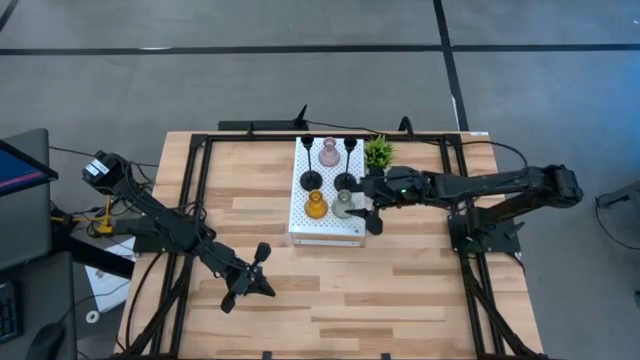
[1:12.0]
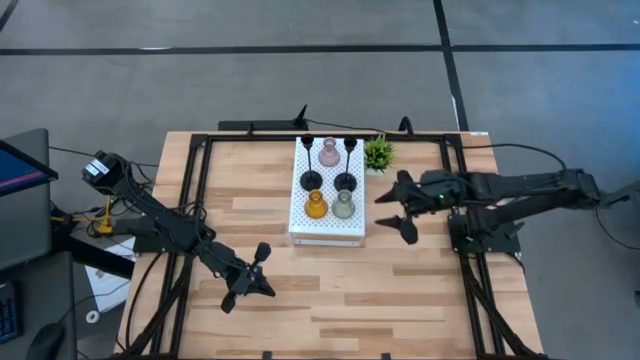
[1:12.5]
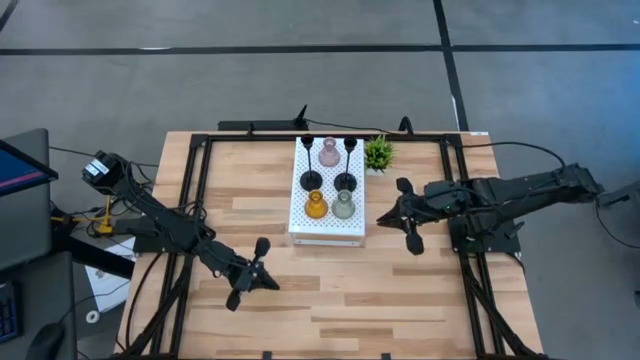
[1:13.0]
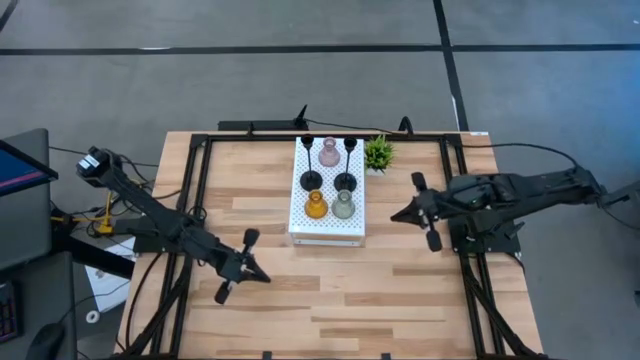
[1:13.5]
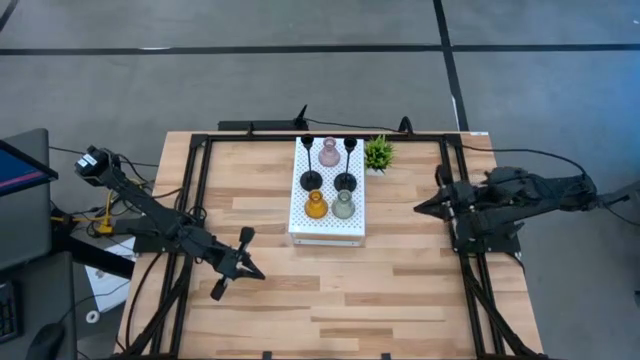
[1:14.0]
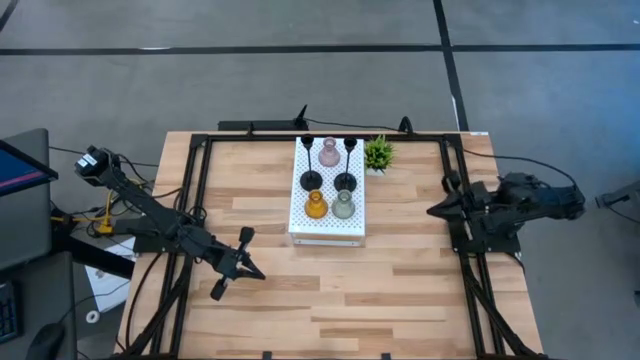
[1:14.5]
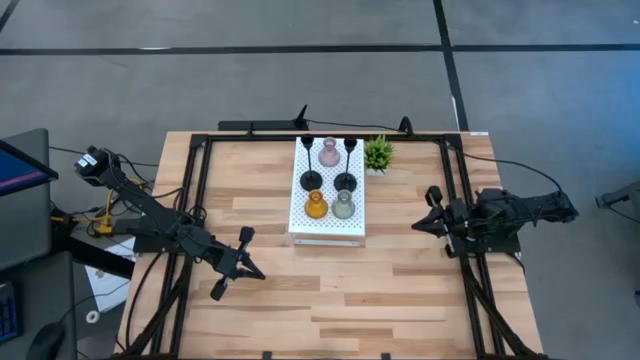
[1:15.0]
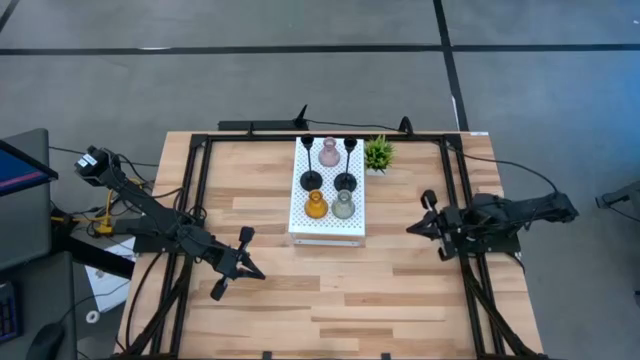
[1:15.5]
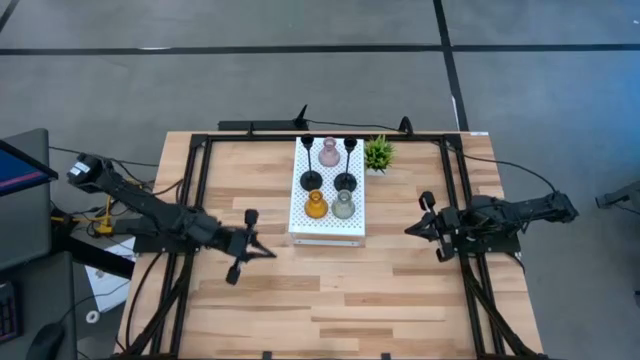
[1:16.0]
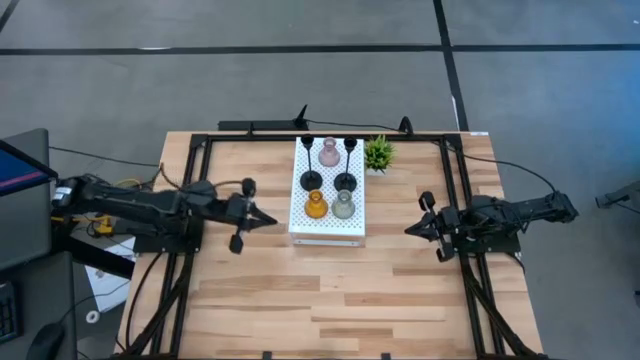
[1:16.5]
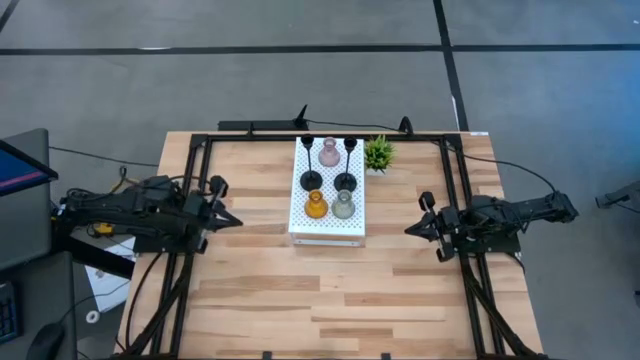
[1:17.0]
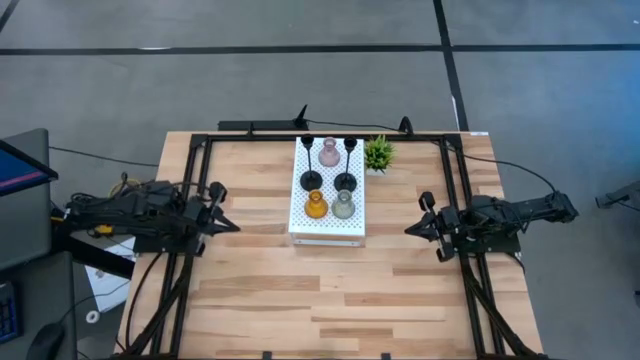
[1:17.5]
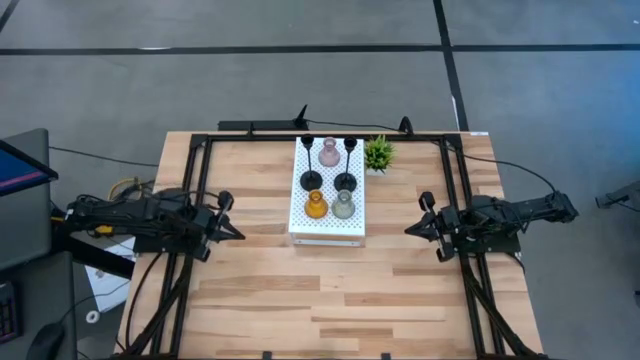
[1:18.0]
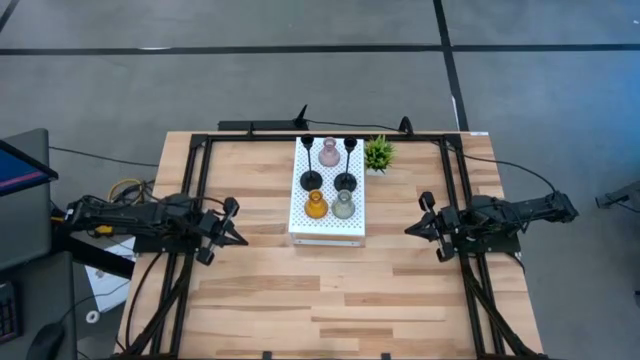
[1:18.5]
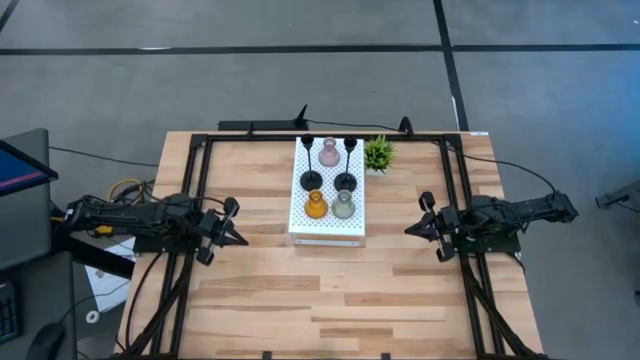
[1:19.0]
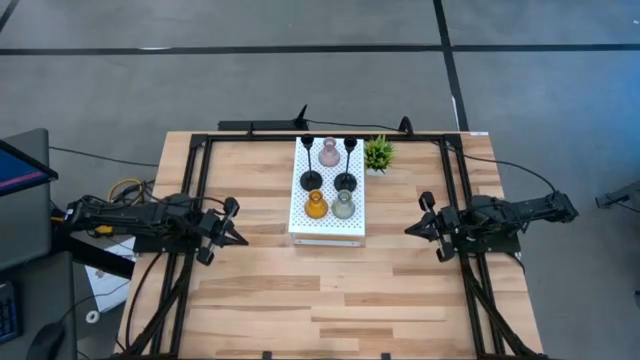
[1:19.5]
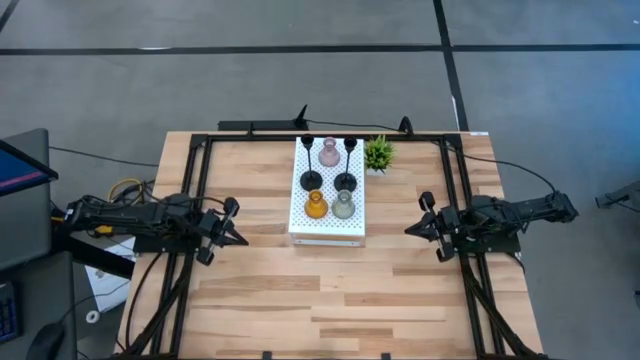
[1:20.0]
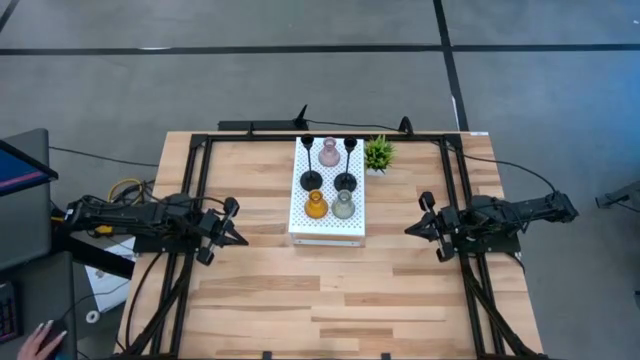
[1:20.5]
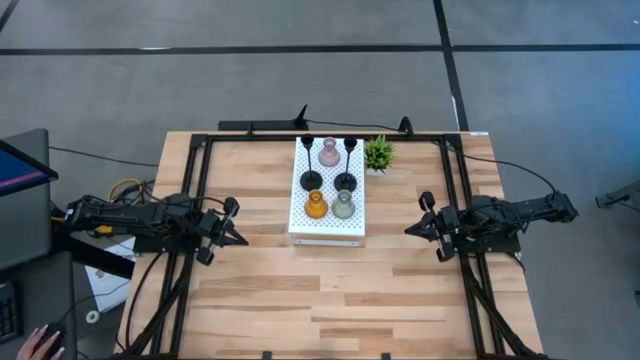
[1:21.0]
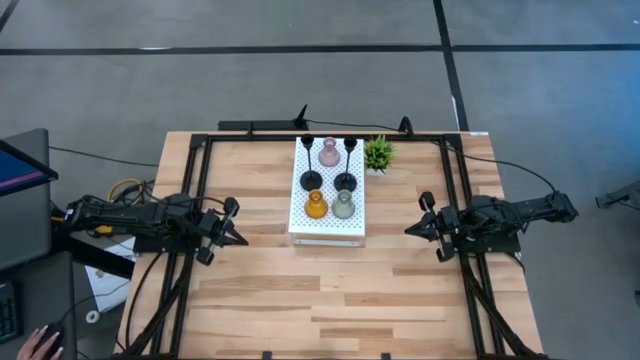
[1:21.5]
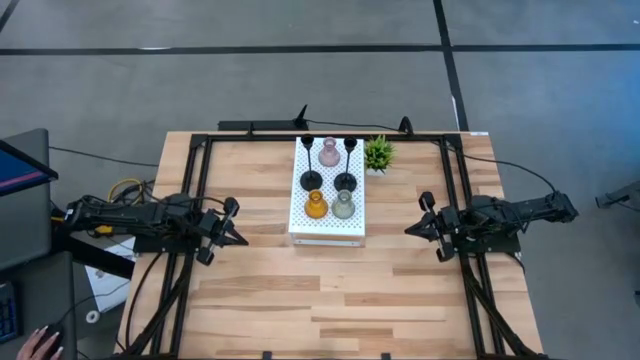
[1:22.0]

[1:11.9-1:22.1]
Task: Pick & Place candle stick holders
Return to Home Position

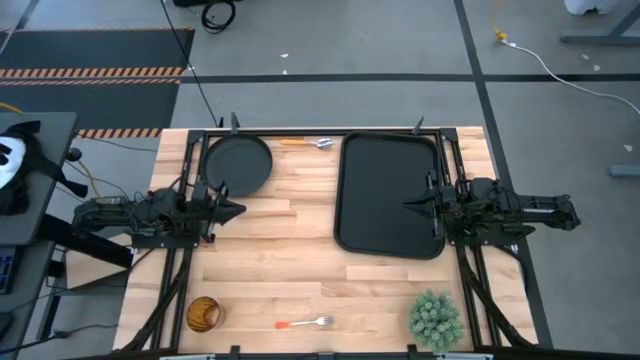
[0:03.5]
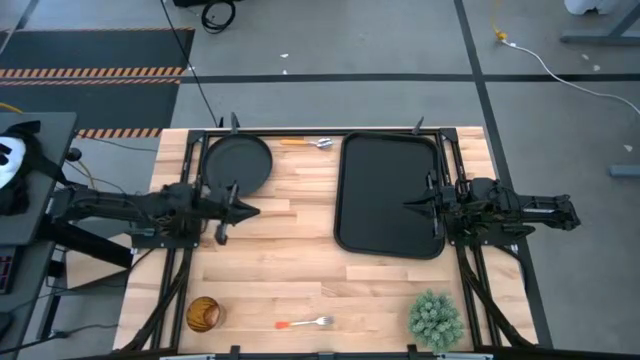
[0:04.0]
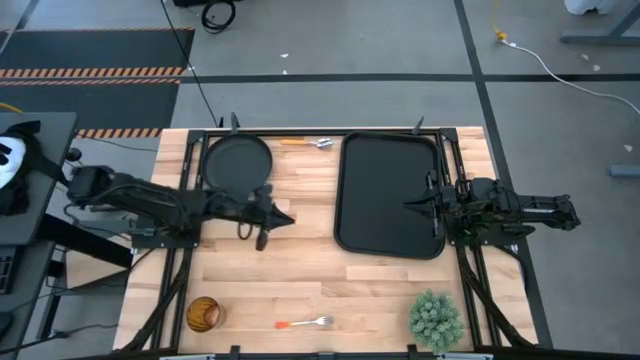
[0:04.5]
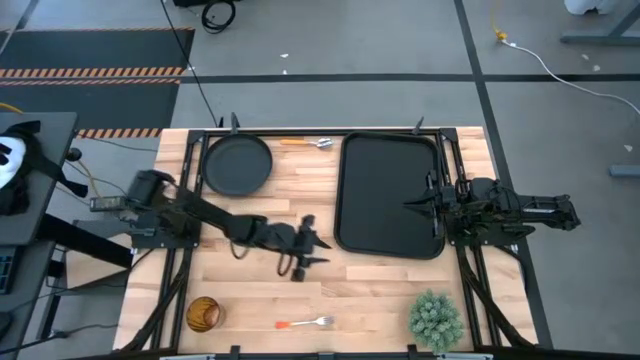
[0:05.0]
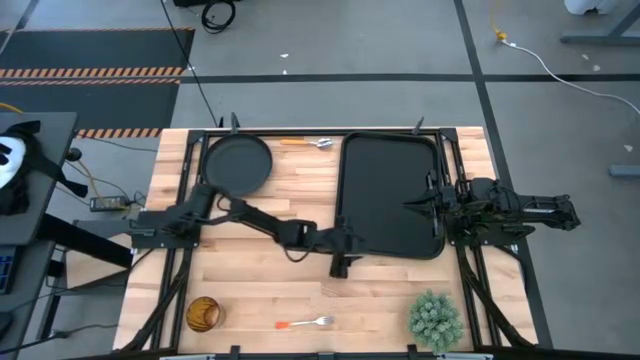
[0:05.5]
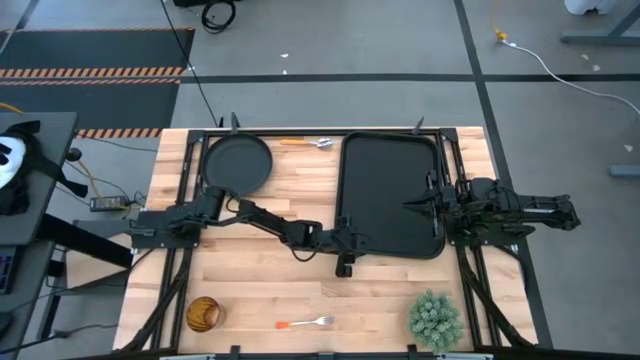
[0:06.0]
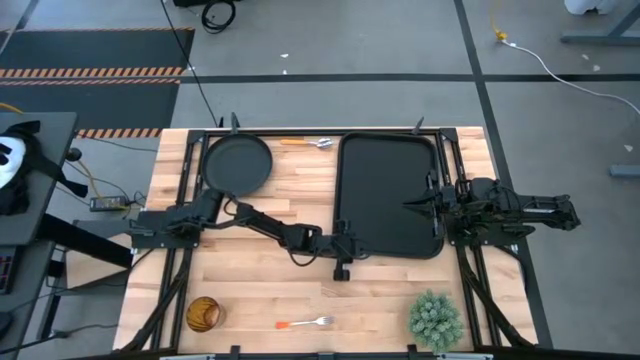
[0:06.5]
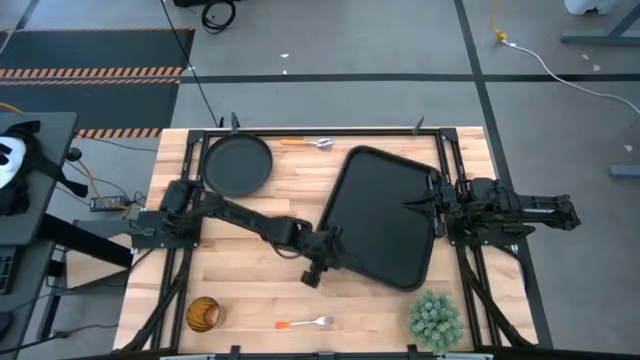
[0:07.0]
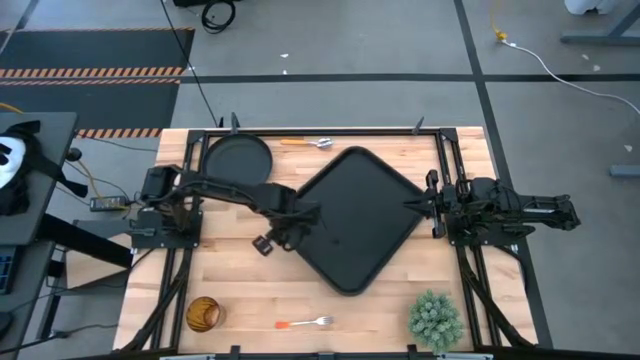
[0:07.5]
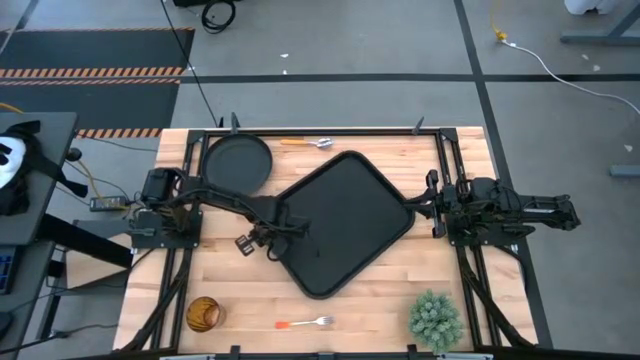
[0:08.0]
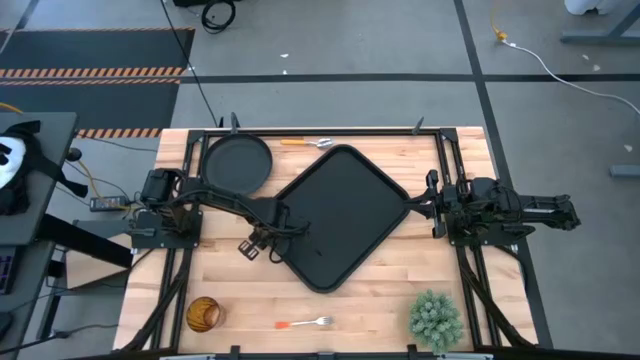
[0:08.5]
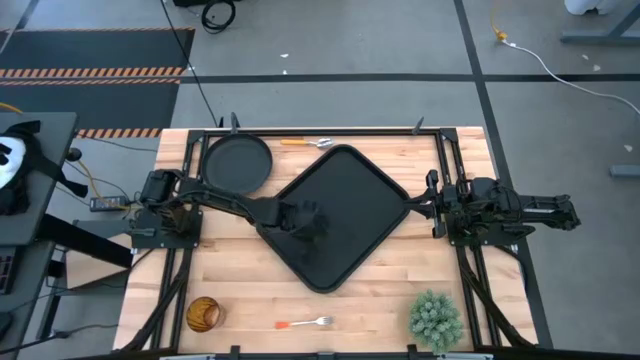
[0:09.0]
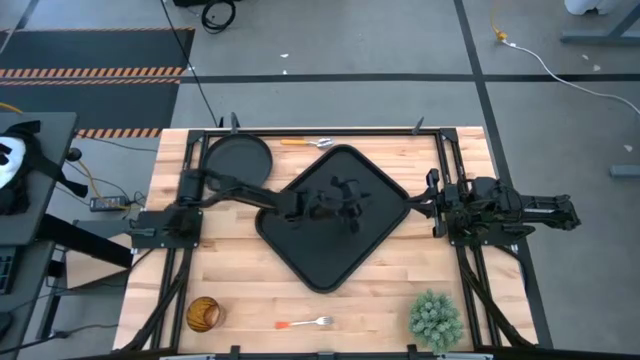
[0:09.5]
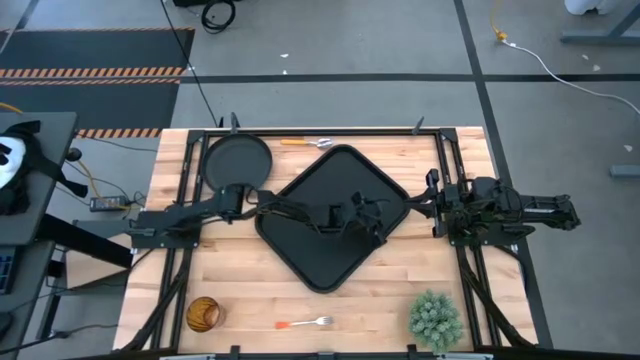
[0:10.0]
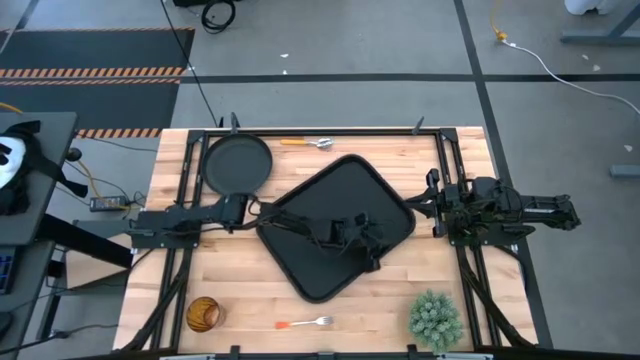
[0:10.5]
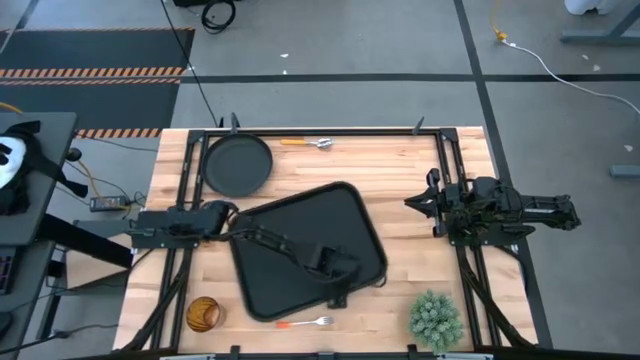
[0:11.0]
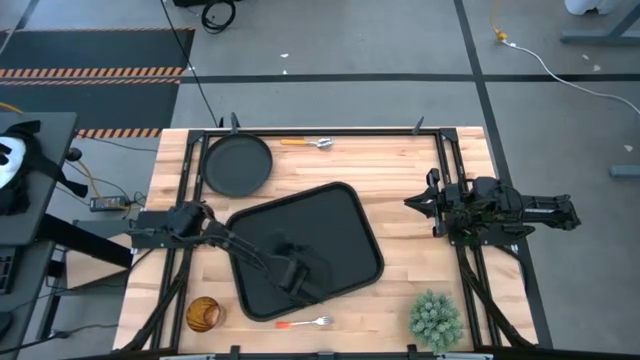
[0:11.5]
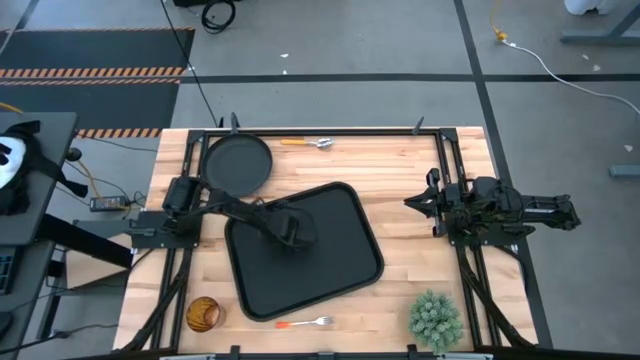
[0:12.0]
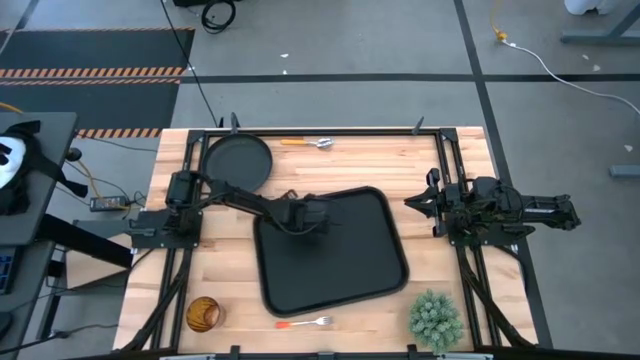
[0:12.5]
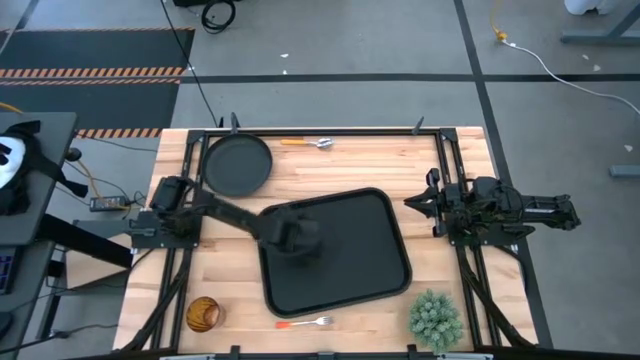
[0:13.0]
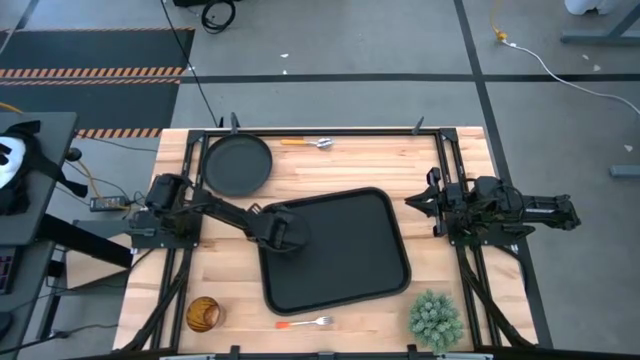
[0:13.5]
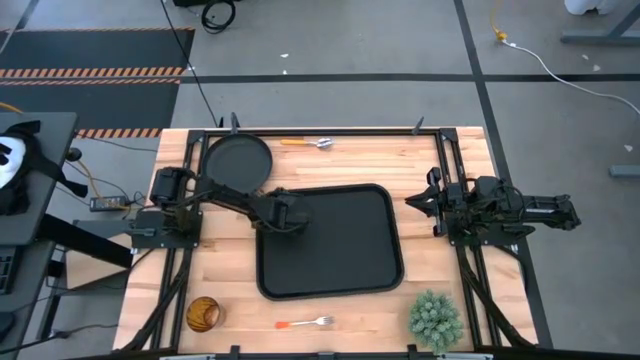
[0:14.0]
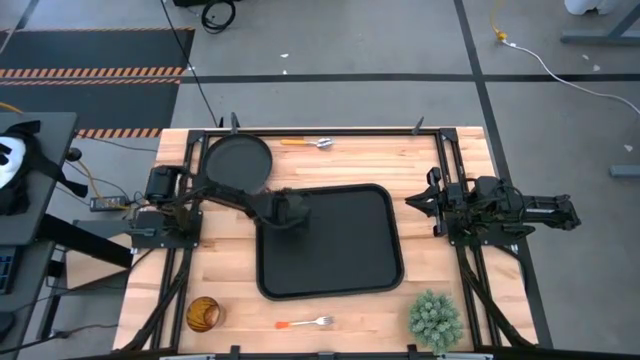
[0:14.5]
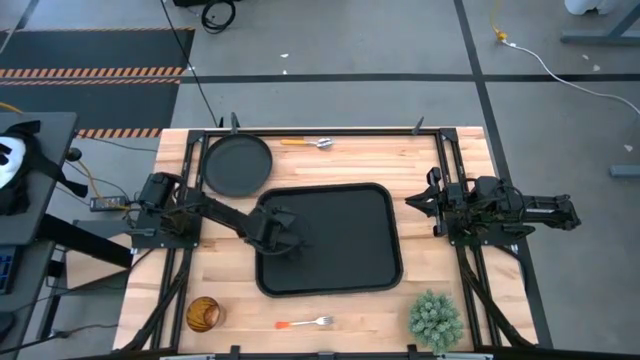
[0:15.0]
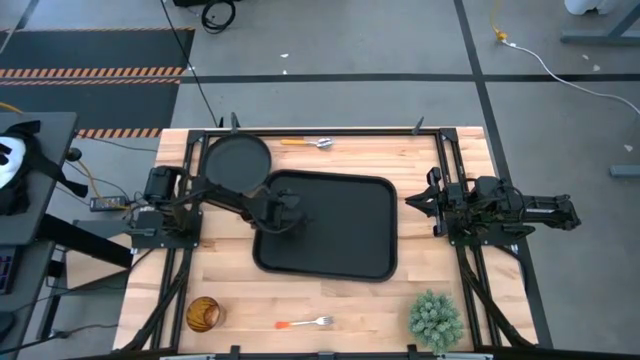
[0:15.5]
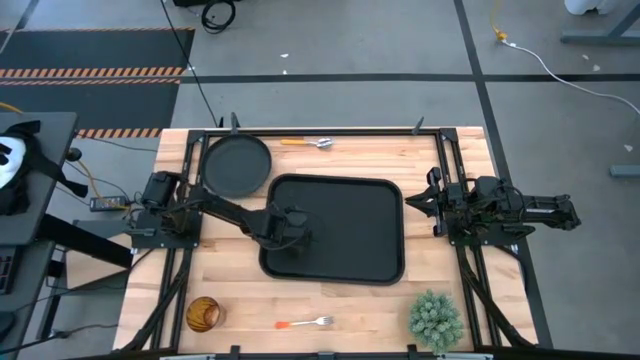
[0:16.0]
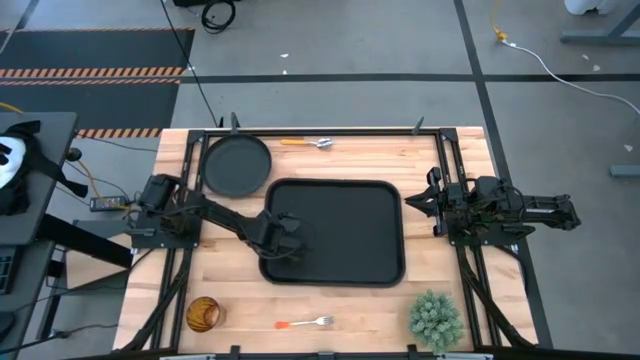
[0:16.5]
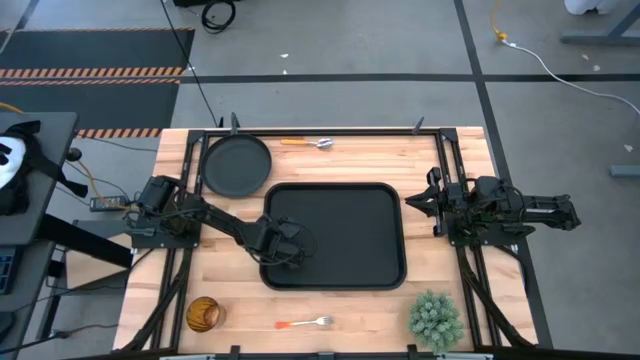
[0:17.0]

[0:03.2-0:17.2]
Task: Pick and place plate/cup/fork/spoon on tray
Move the black tray to the center of the table
